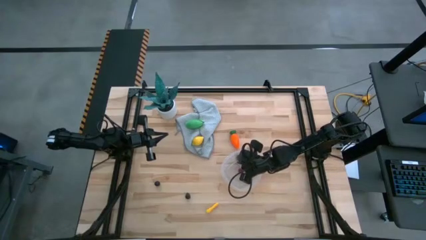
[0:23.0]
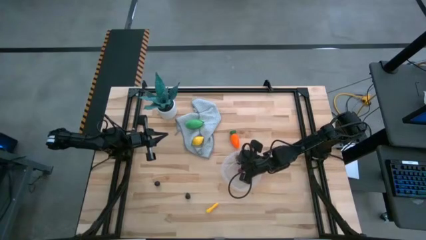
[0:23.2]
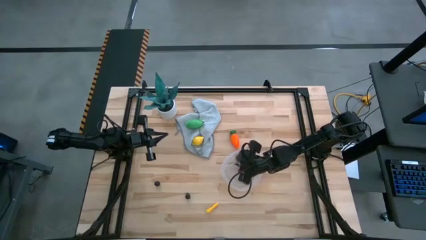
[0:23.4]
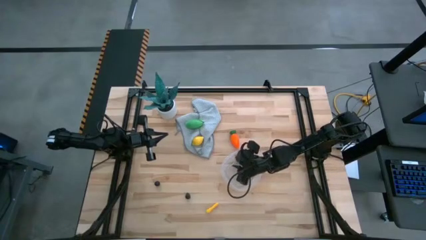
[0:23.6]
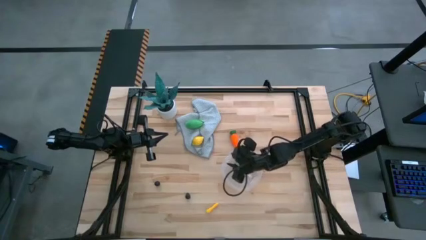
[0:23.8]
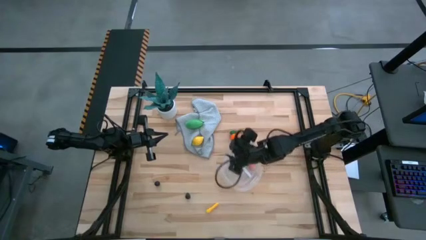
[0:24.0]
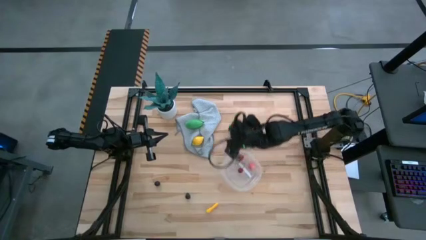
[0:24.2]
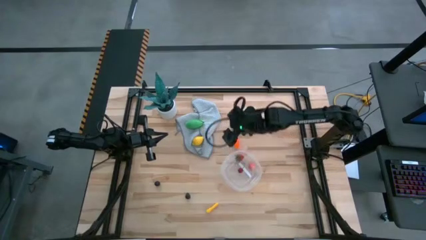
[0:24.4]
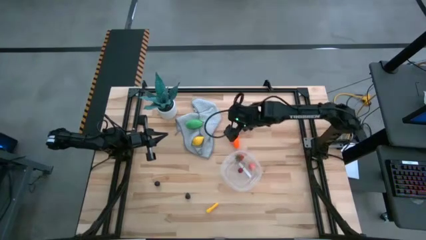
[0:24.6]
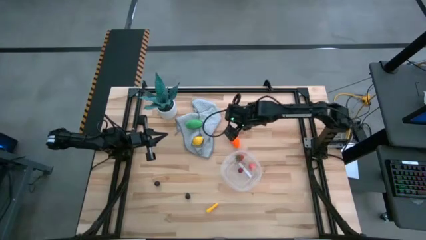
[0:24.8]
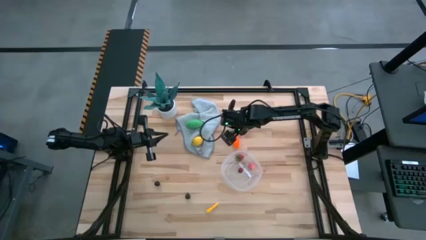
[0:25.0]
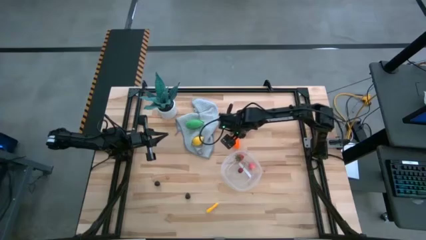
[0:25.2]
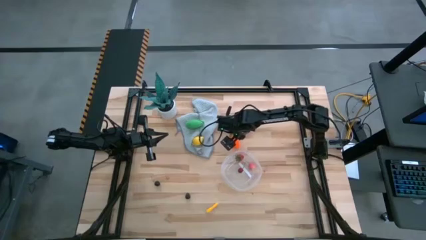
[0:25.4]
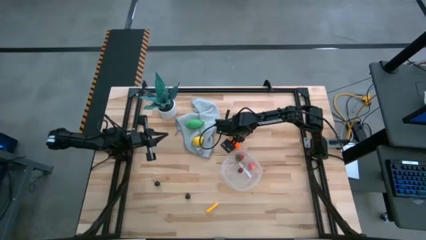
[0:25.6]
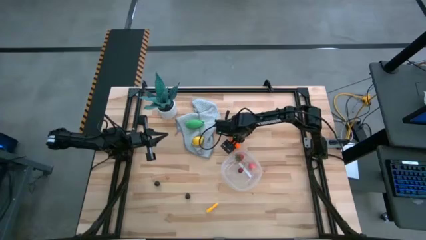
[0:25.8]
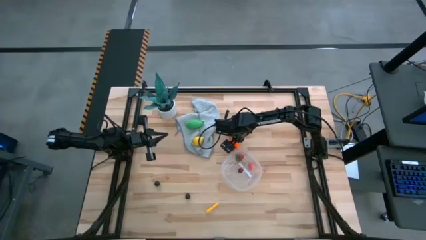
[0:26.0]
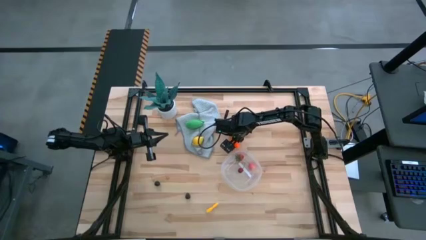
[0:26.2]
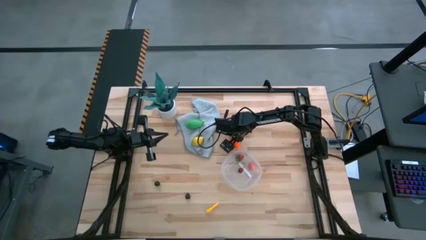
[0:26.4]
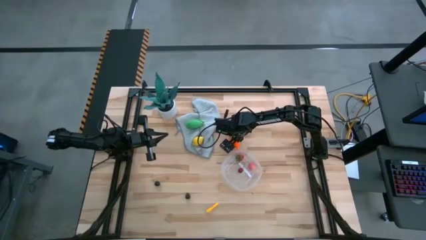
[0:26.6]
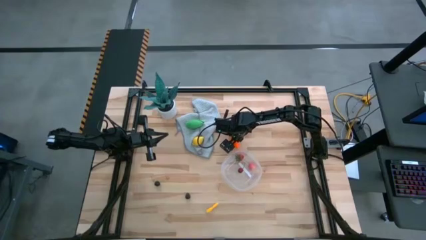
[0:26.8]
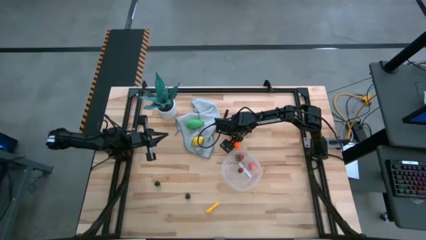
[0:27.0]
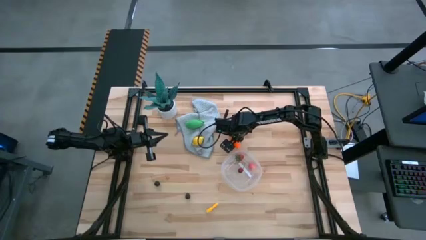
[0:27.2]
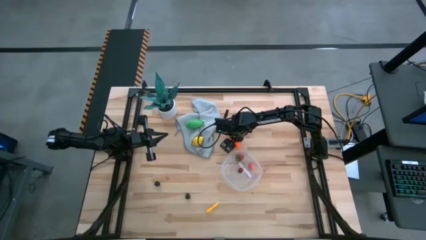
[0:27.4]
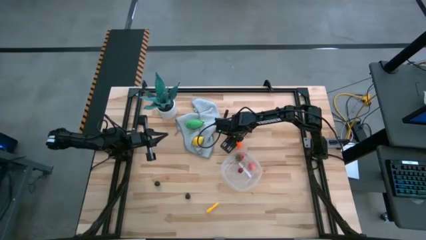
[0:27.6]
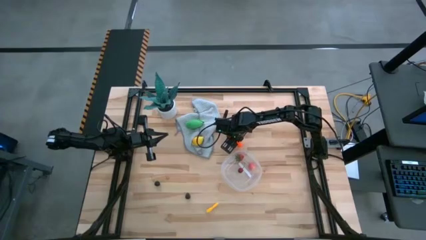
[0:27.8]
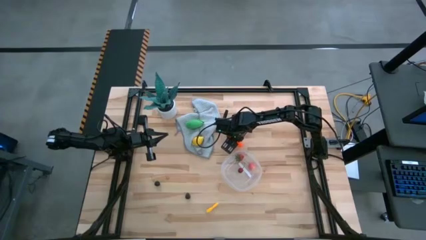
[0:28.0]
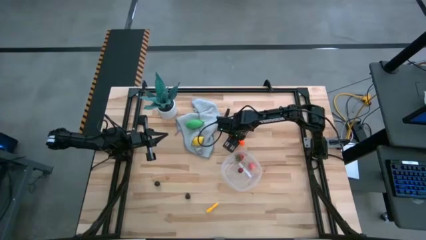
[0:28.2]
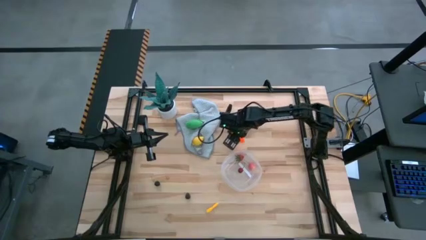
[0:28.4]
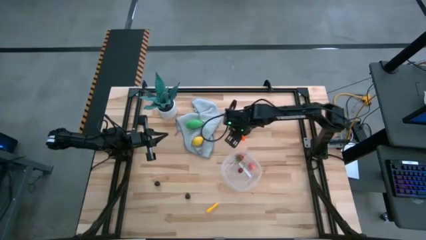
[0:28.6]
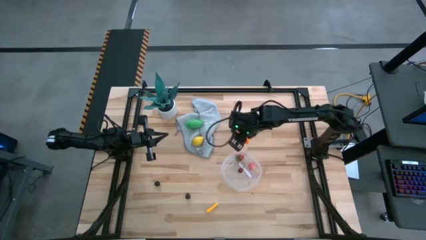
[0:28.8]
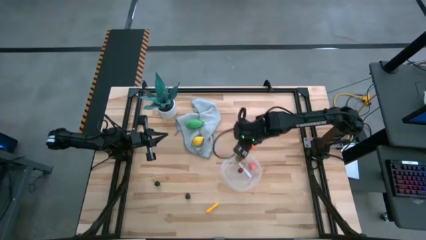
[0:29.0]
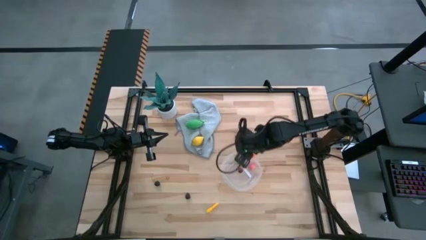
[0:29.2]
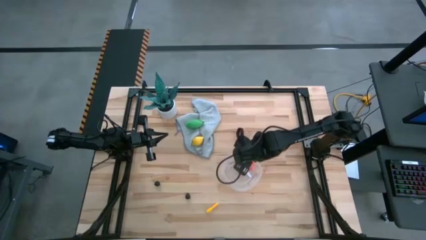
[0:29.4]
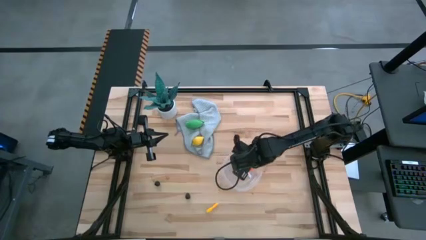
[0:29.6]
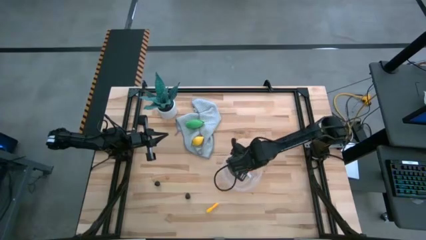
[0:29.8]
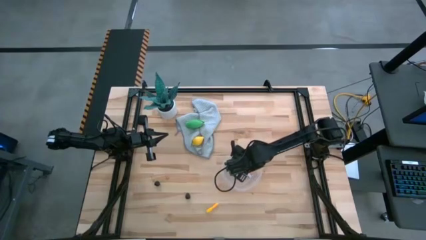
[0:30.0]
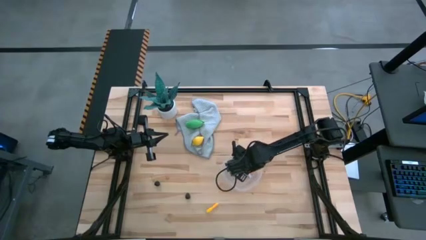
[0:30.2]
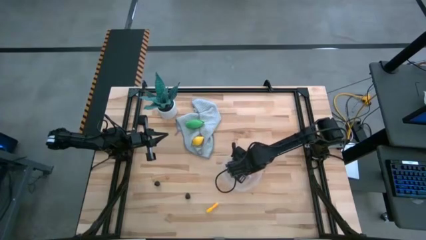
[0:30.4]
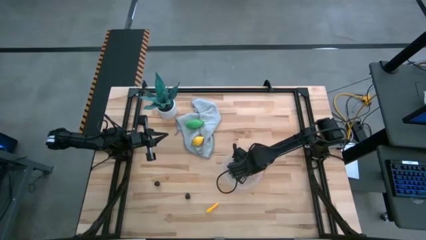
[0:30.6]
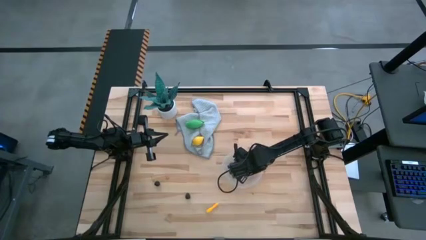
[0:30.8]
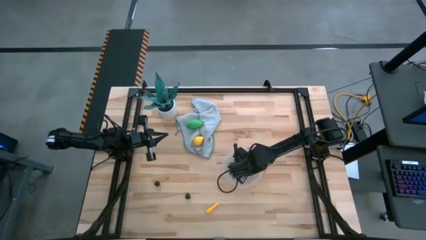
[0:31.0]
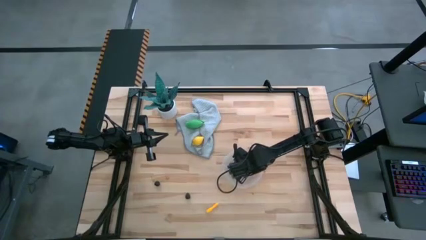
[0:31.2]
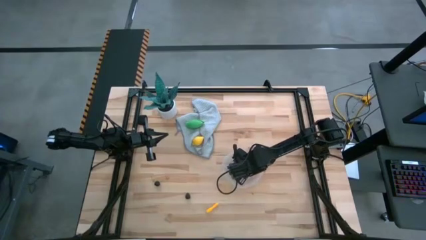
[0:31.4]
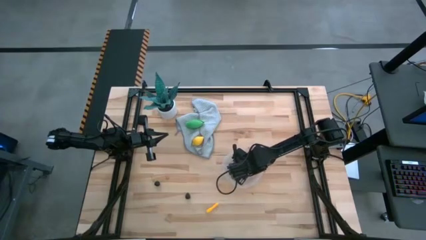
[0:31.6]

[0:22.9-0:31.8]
Task: Pick and placing Produce into tupperware
Put the carrot into the transparent bin

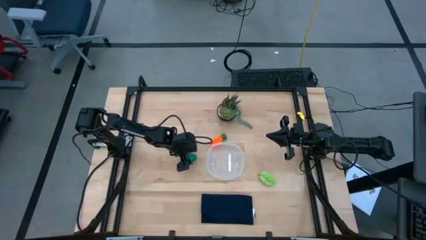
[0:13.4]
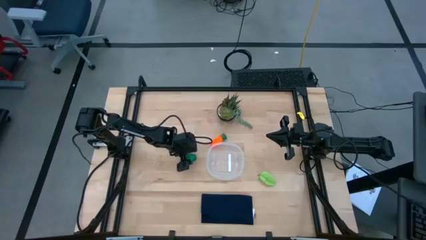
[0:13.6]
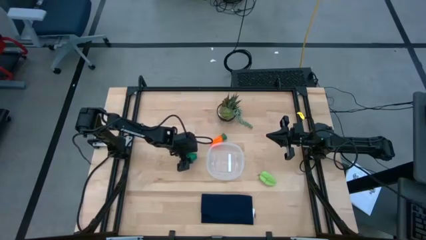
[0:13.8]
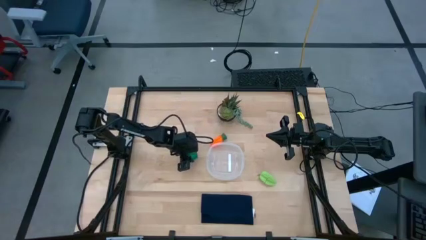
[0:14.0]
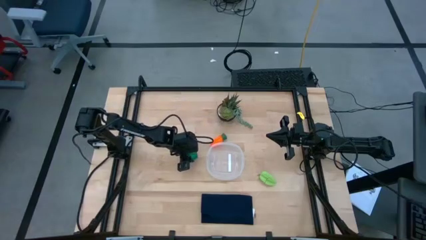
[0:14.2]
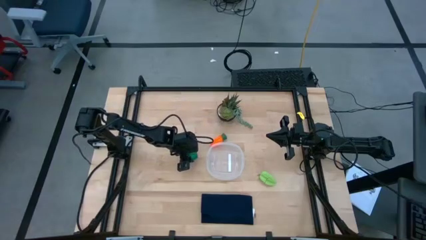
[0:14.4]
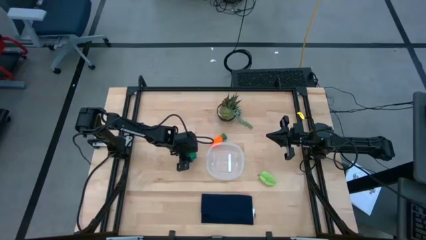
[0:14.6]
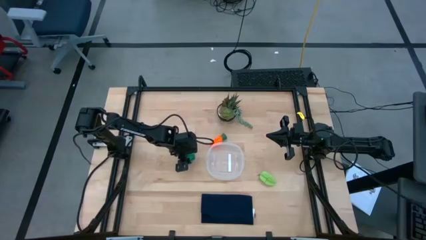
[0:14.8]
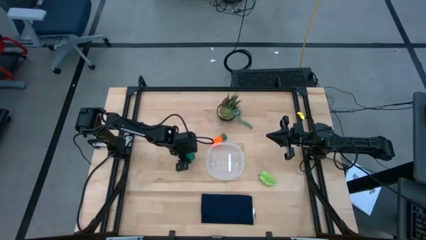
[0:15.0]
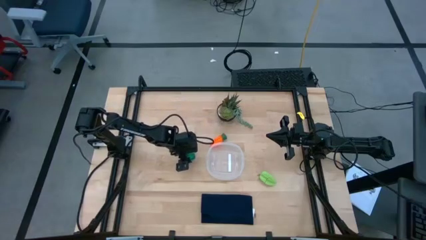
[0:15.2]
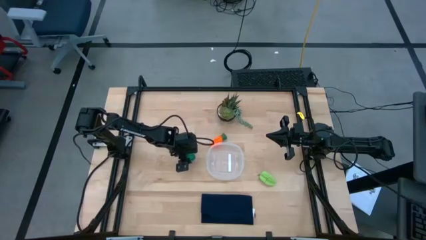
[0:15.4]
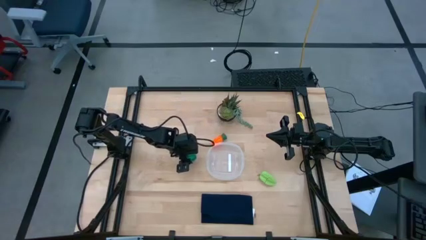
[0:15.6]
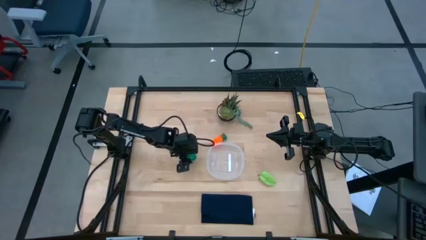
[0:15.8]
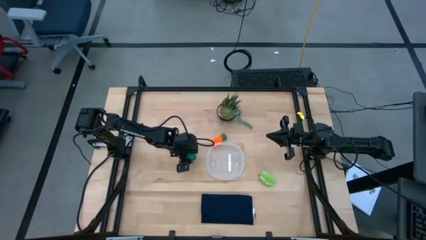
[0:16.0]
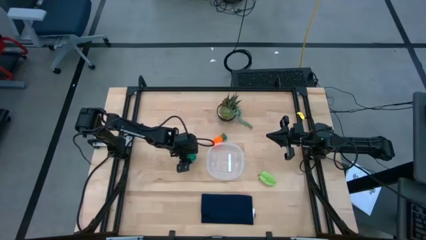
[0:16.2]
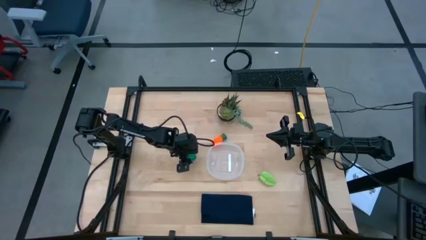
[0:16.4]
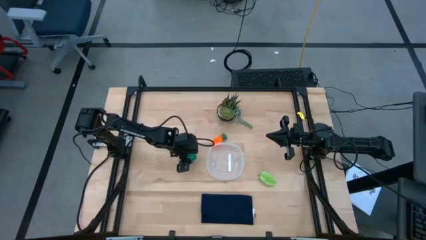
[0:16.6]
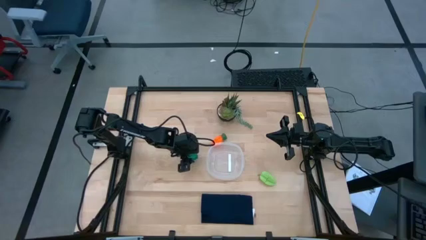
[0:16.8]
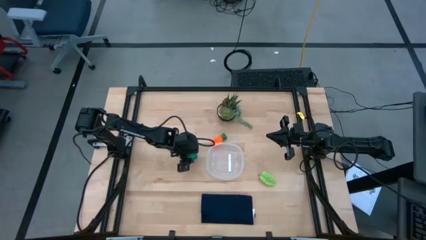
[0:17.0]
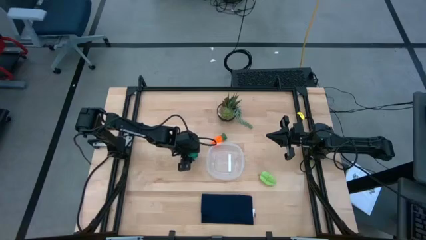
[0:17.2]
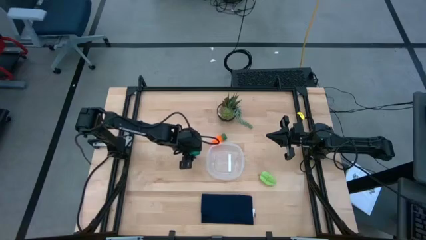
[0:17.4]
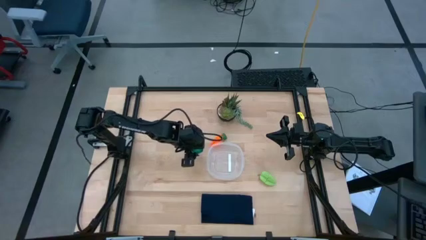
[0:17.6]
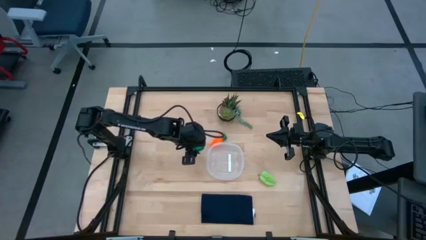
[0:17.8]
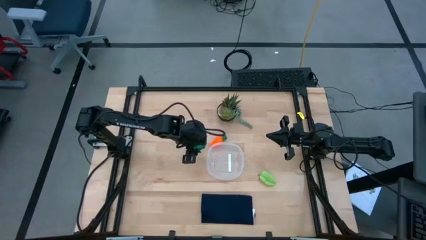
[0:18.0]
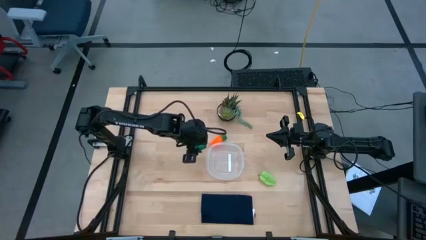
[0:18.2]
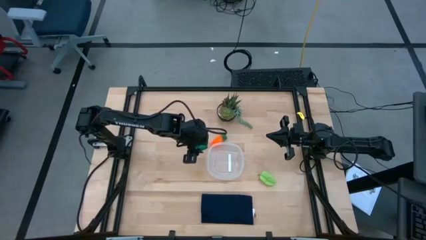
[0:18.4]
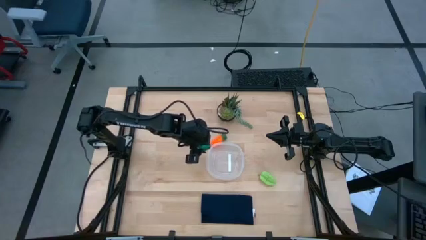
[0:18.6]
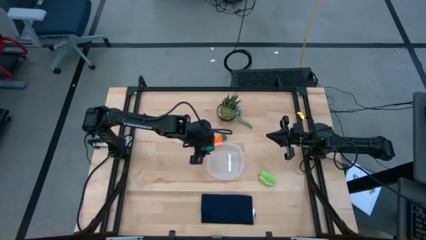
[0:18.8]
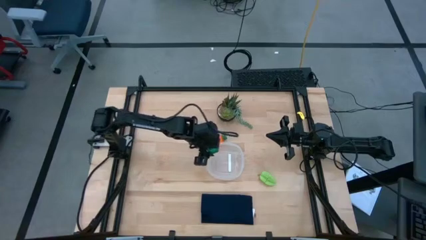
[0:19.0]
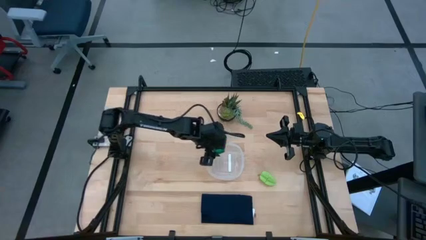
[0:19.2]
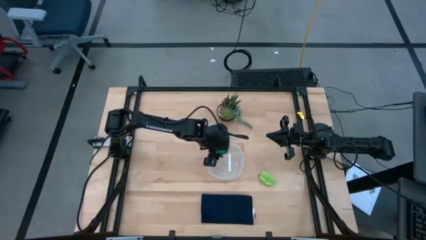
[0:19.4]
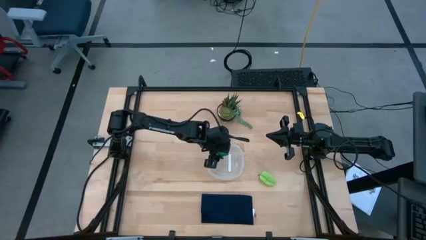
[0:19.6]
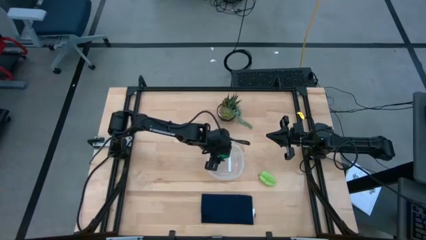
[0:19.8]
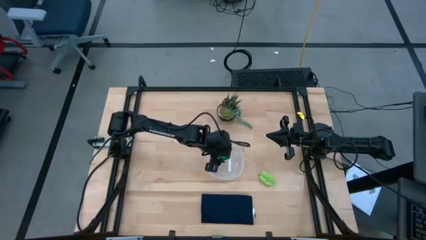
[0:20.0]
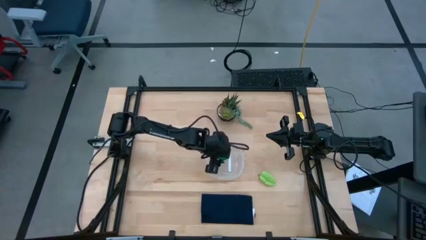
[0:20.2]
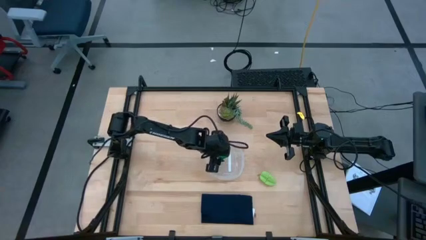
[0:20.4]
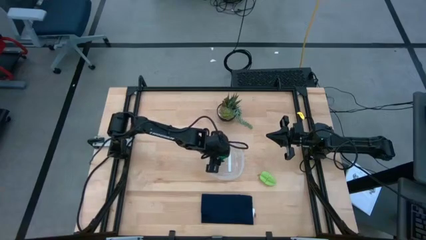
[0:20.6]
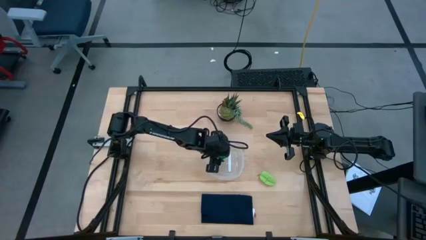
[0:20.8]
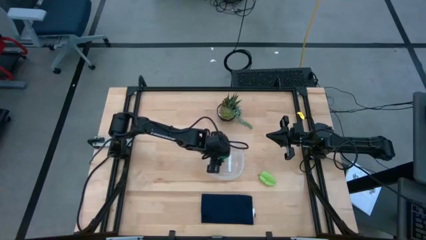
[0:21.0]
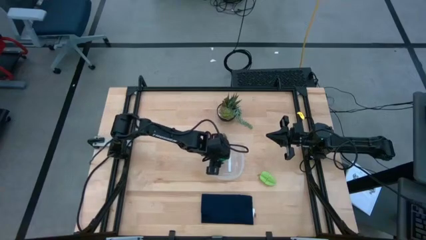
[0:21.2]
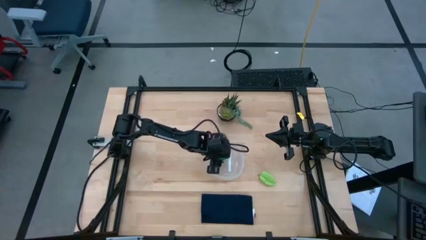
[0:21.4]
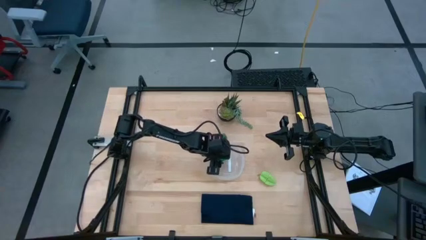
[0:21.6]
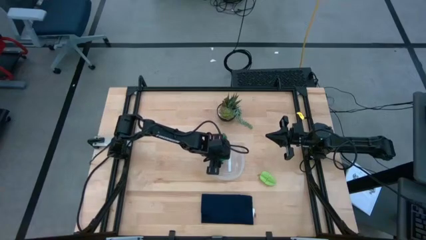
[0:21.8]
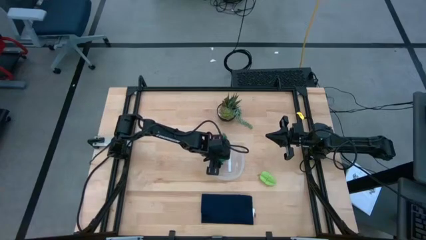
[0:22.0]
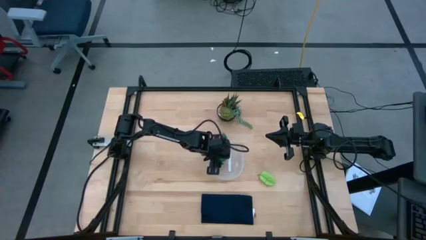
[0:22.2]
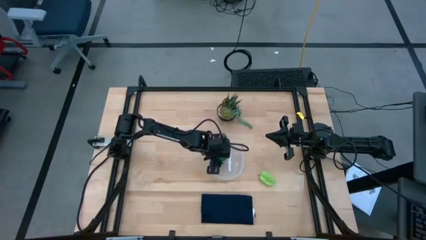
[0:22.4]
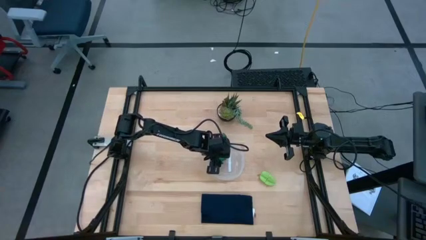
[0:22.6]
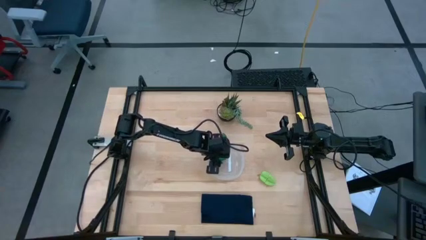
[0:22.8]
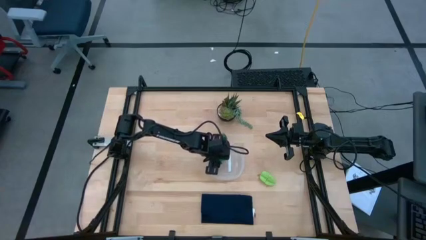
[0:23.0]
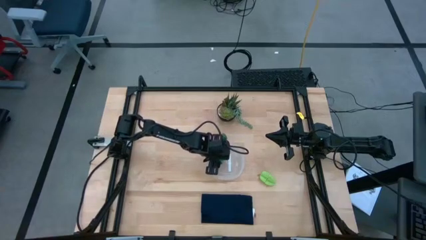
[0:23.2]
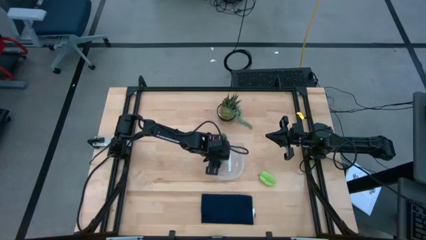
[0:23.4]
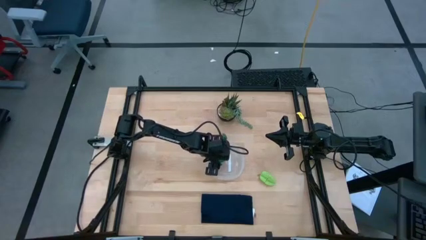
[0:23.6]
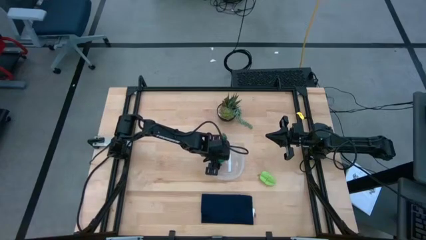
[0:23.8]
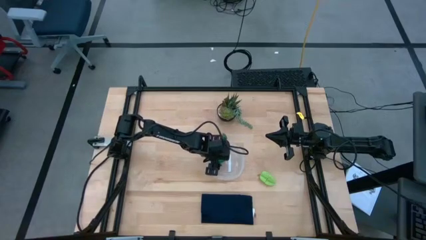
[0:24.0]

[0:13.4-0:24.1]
Task: Pick and placing Produce into tupperware
Put the bell pepper into the transparent bin
